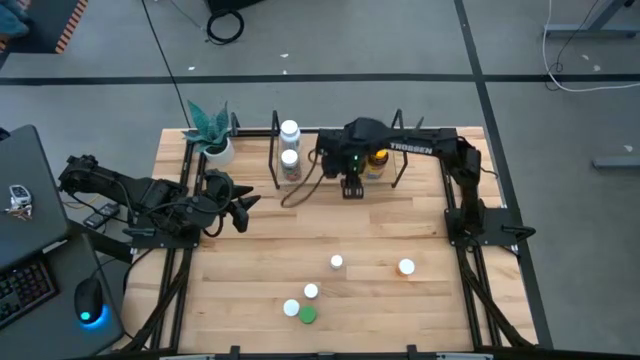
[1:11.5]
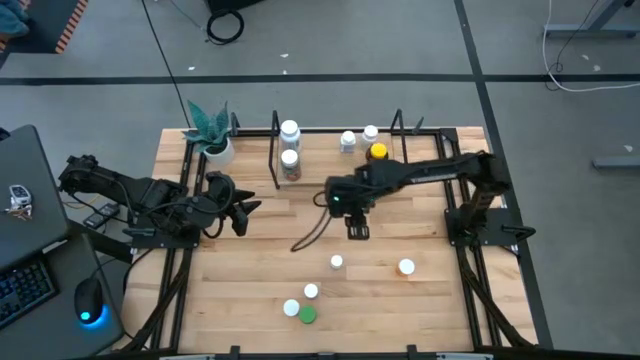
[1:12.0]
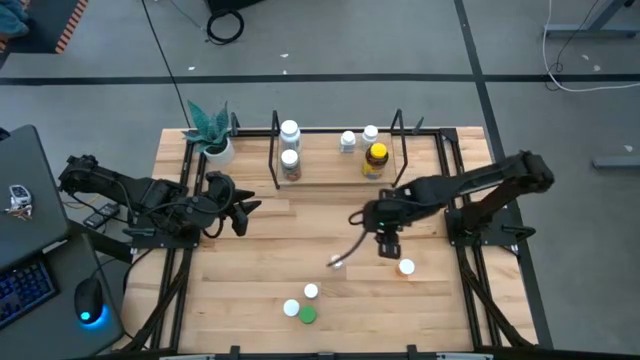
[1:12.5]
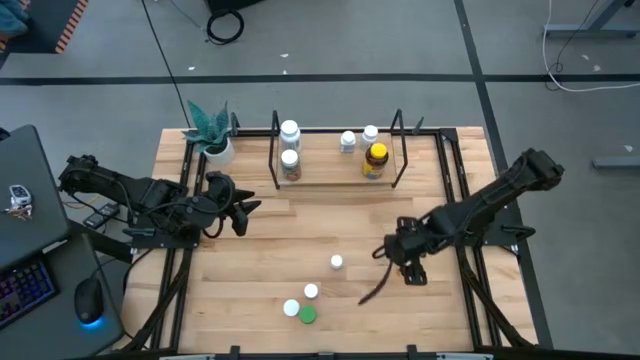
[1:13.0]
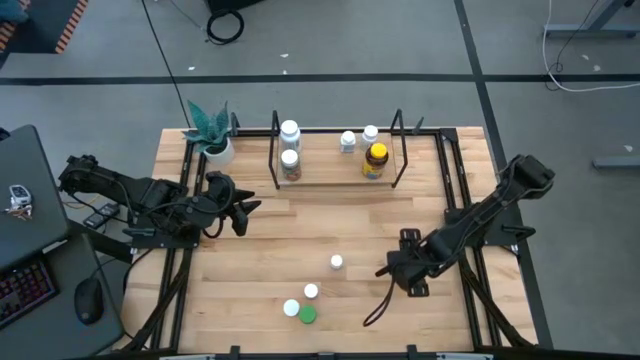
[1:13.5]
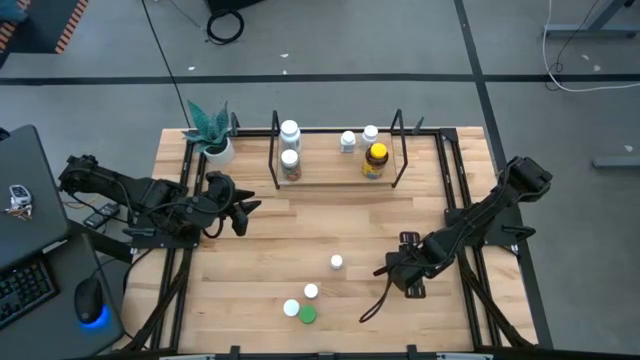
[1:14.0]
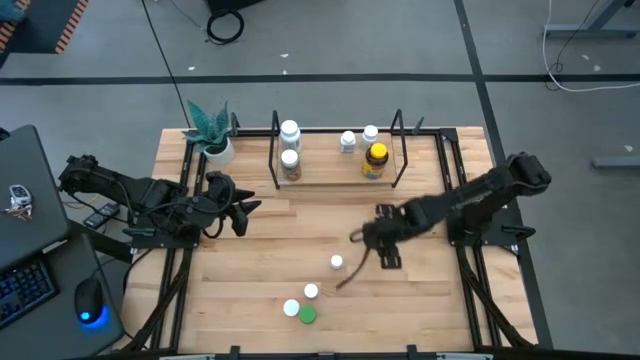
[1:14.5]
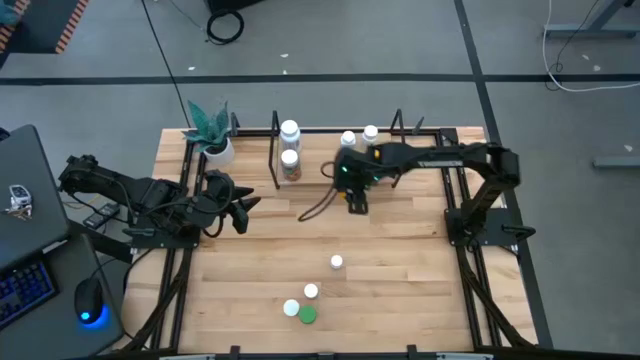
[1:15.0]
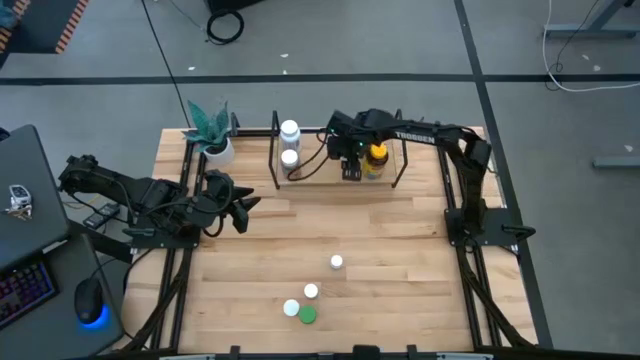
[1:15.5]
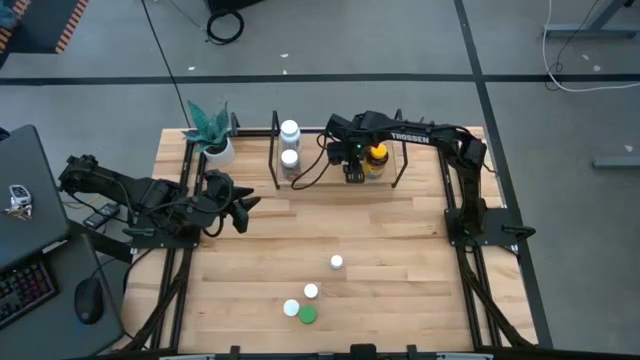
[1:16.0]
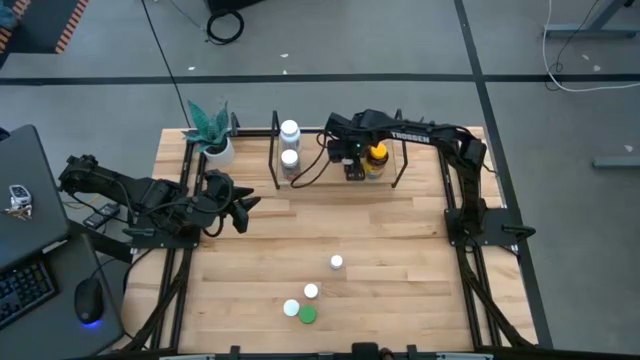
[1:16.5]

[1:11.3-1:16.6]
Task: Pick and place medicine bottles onto shelf by color
Put the yellow pill bottle on the shelf

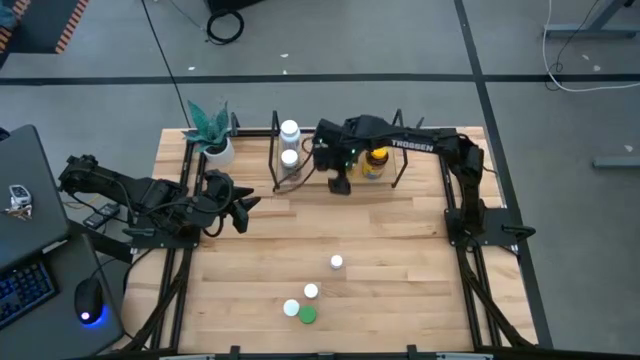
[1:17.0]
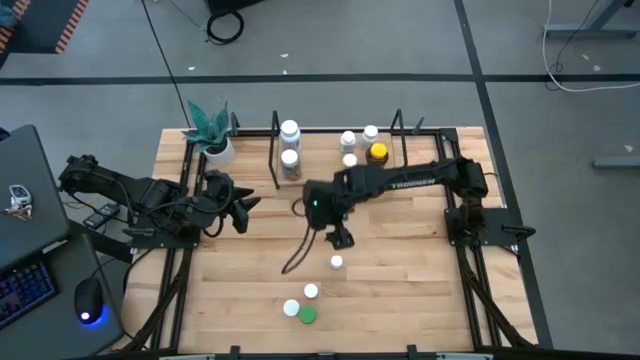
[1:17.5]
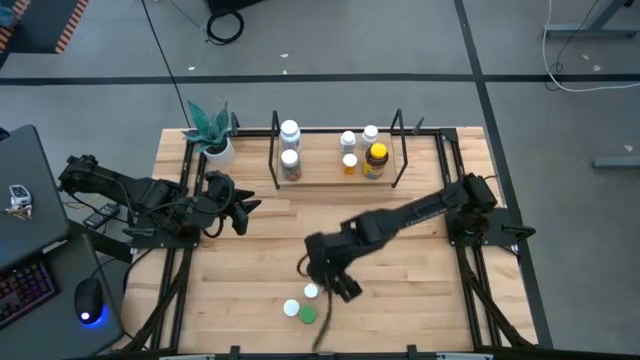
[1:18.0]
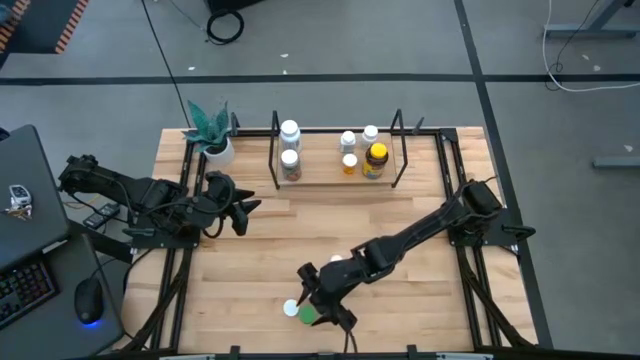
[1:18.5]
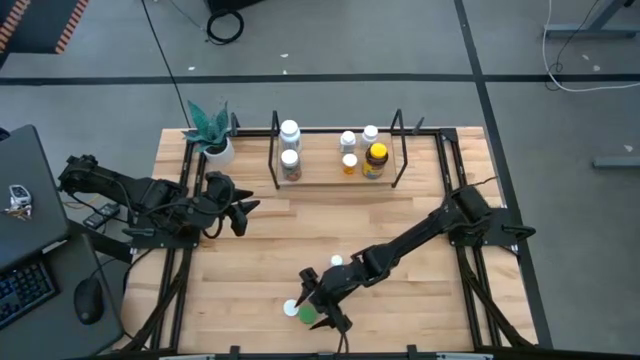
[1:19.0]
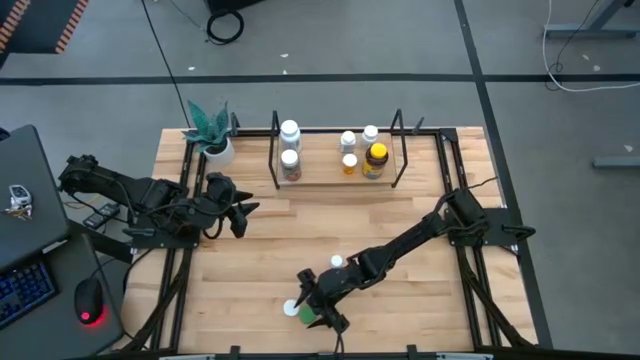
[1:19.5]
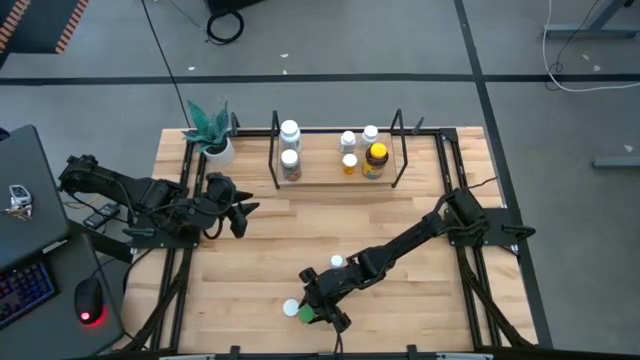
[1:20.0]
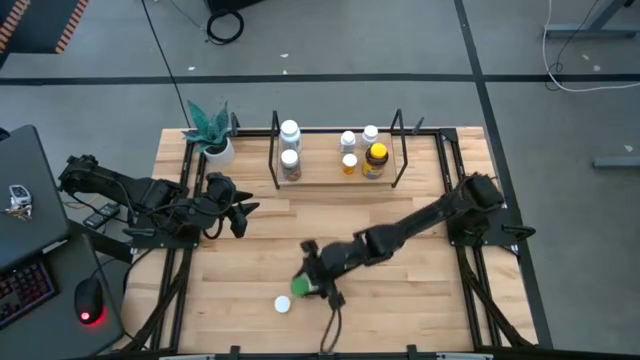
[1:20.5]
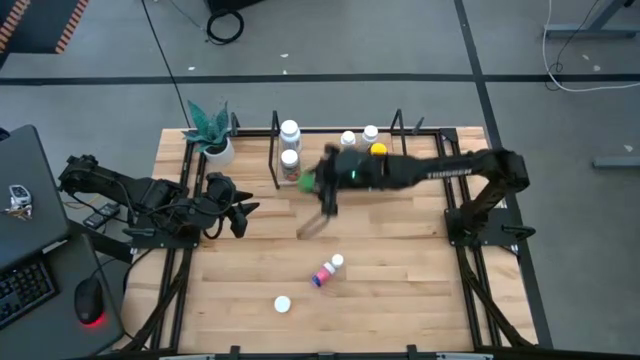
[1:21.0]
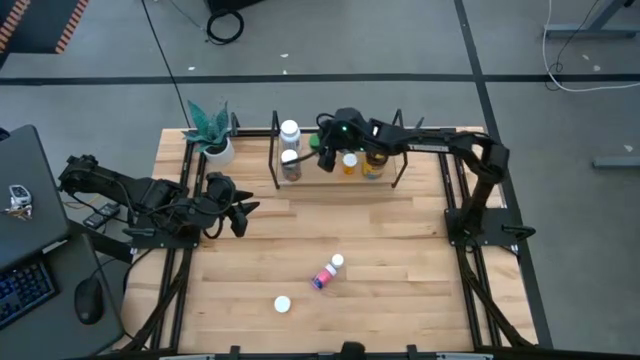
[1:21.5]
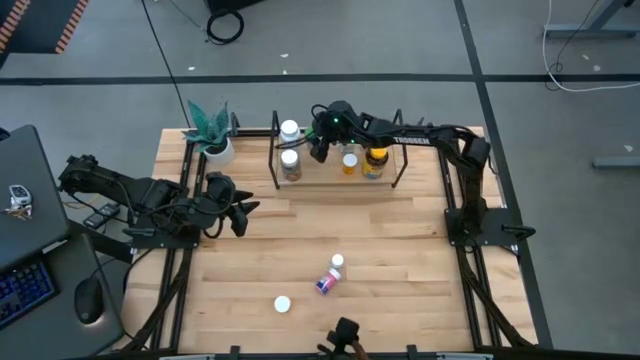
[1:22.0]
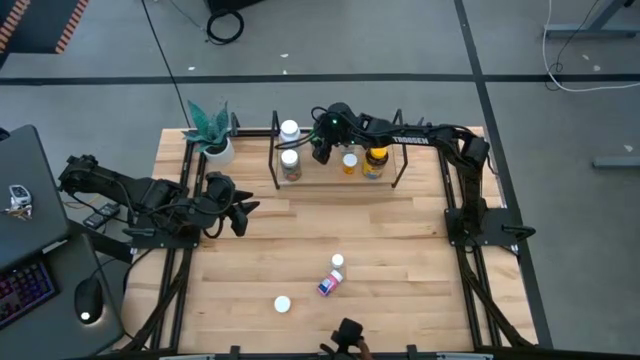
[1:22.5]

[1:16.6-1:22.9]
Put the small green pill bottle on the shelf

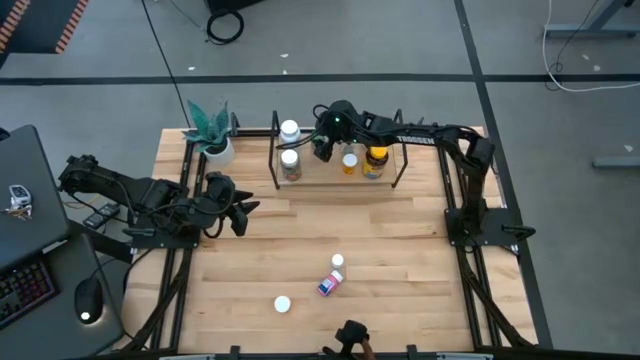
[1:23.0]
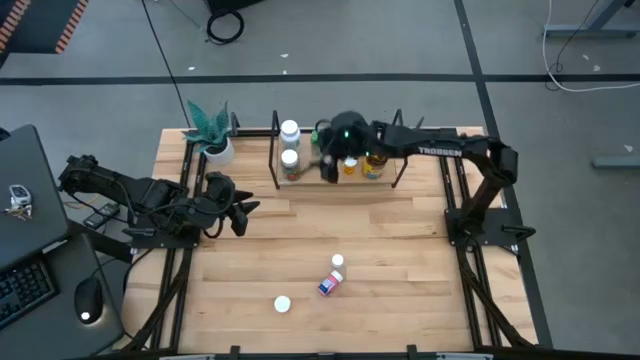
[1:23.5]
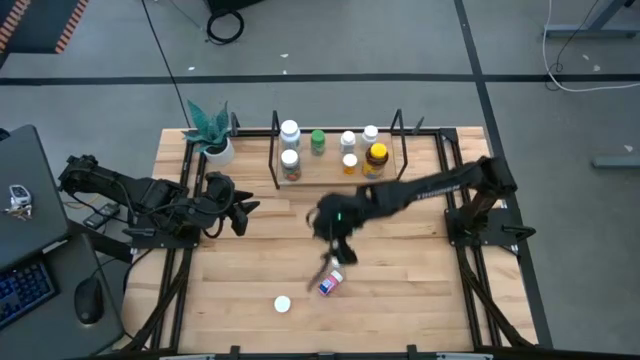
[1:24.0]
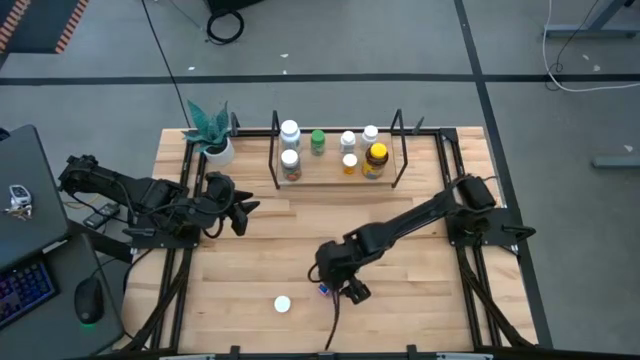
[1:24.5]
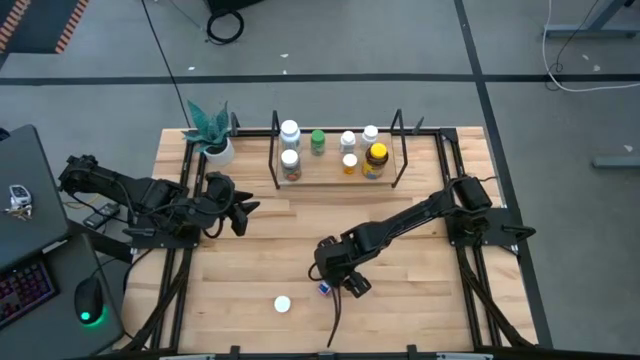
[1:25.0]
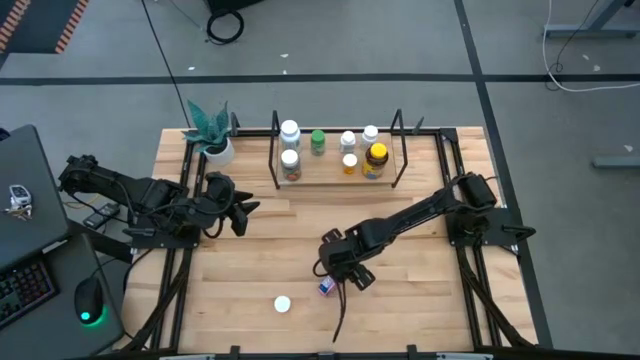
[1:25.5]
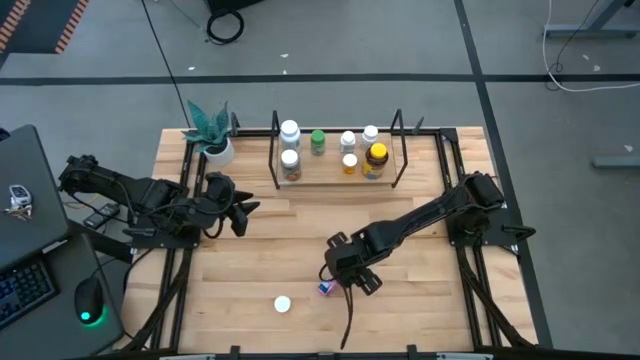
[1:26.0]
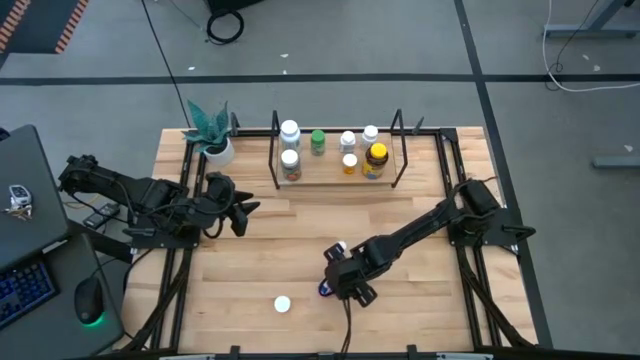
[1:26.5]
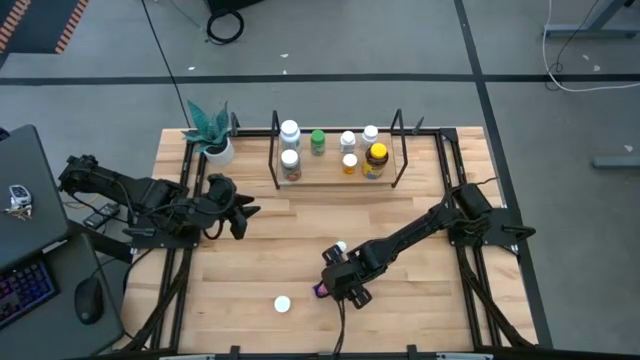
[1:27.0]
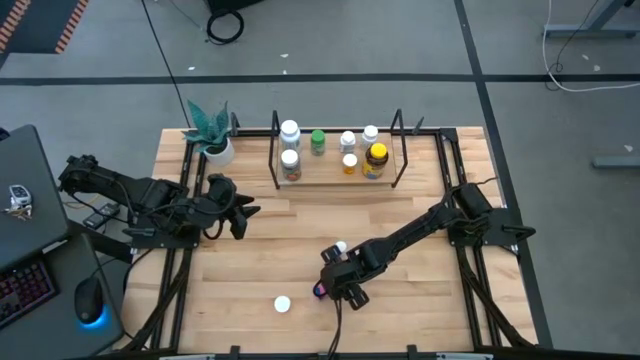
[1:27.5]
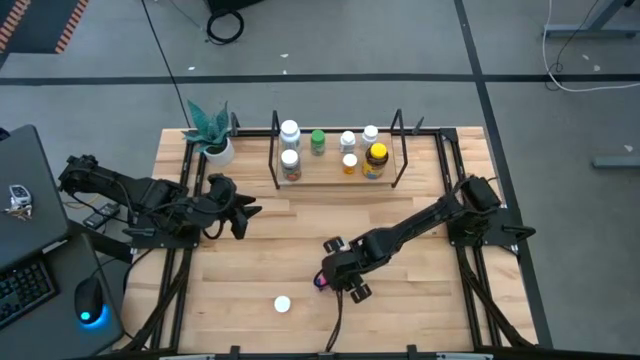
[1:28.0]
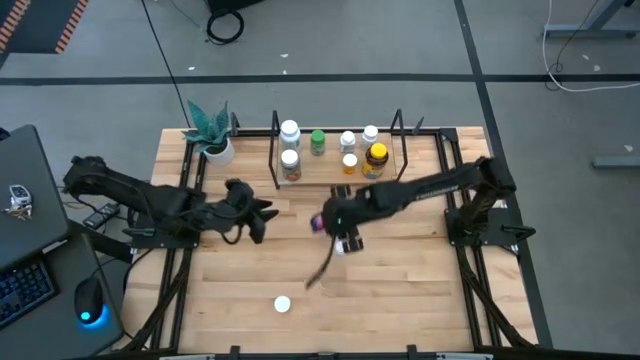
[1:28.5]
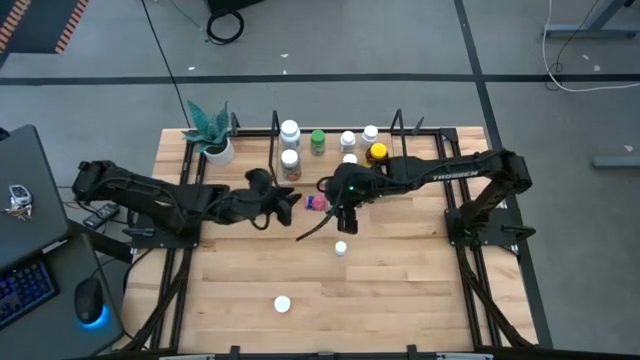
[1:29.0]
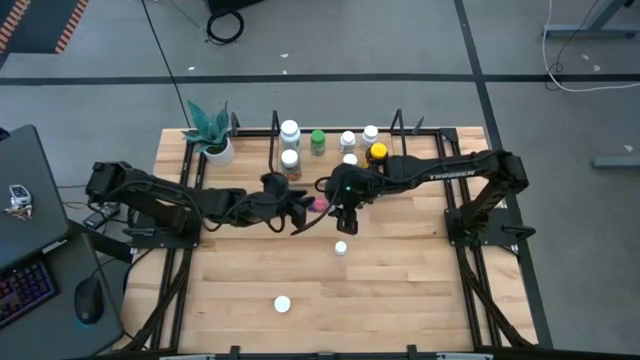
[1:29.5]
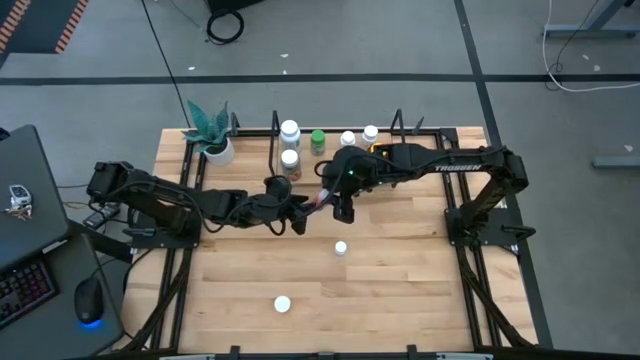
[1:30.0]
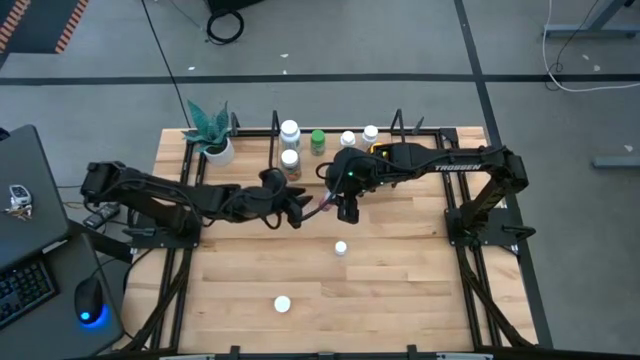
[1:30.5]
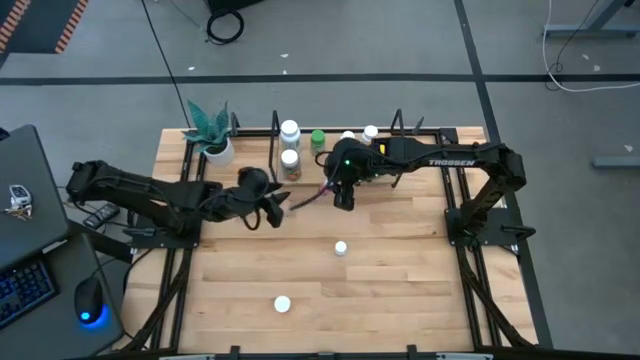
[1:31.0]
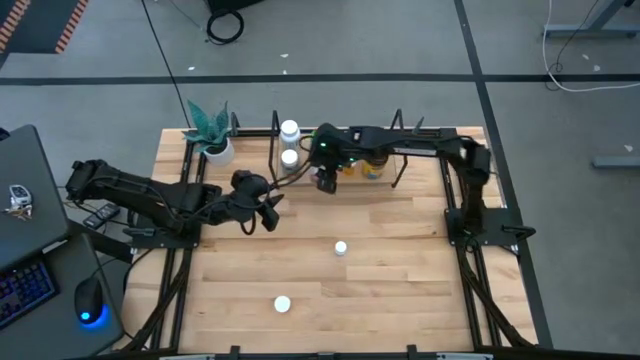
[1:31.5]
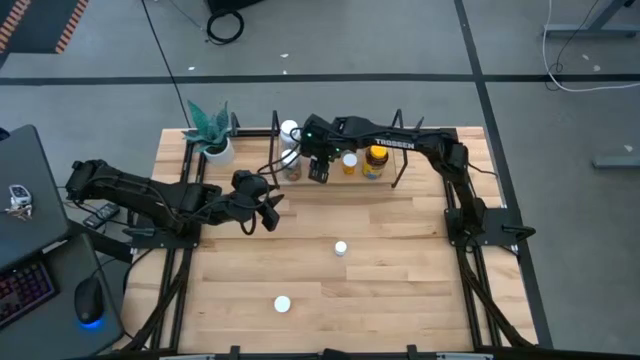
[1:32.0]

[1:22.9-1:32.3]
Put the pink pill bottle on the shelf
